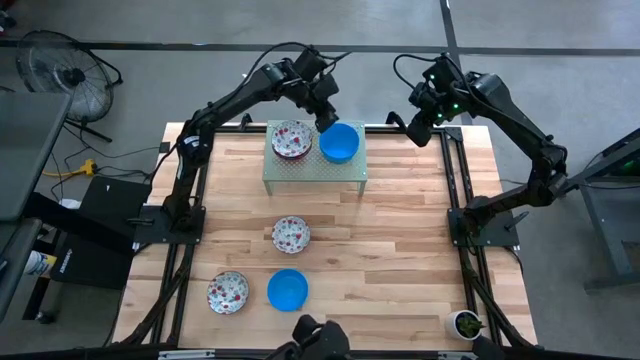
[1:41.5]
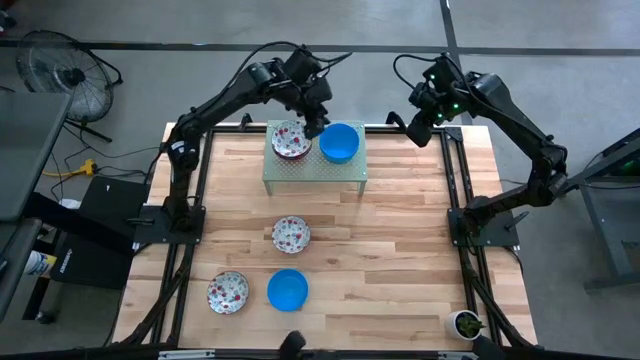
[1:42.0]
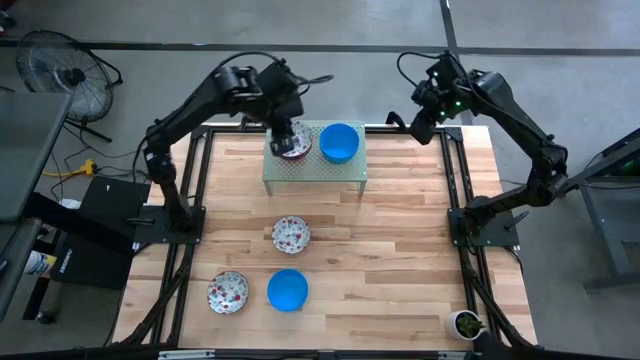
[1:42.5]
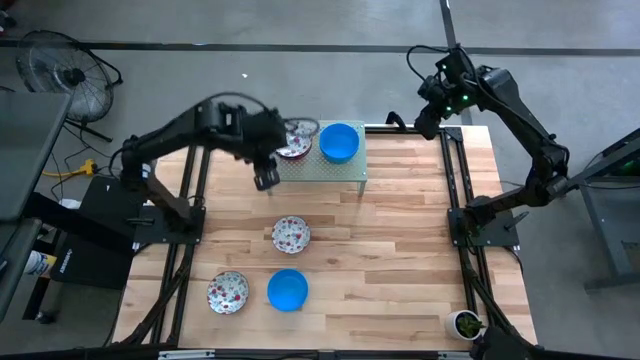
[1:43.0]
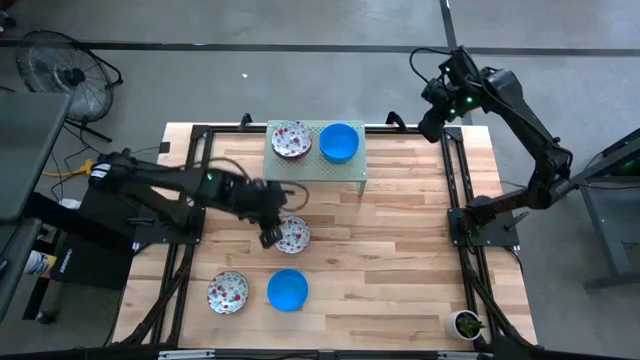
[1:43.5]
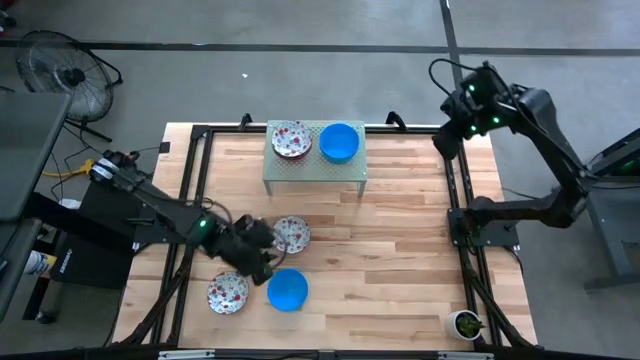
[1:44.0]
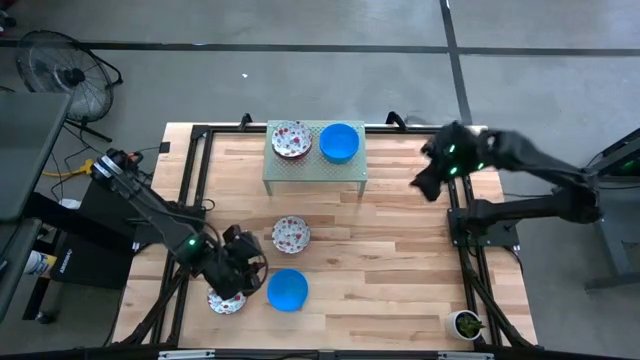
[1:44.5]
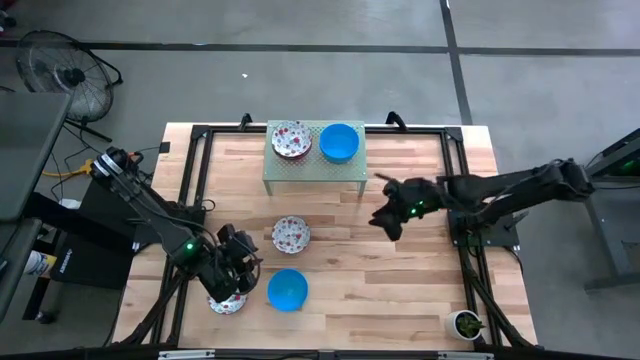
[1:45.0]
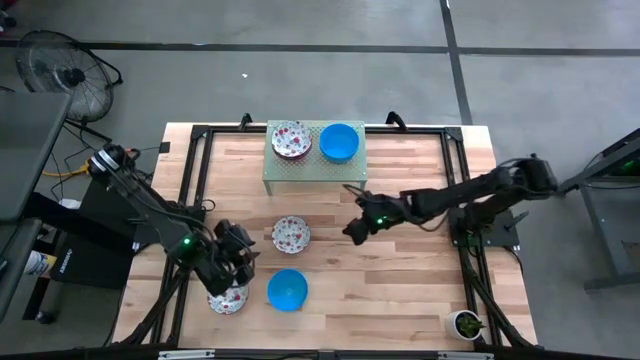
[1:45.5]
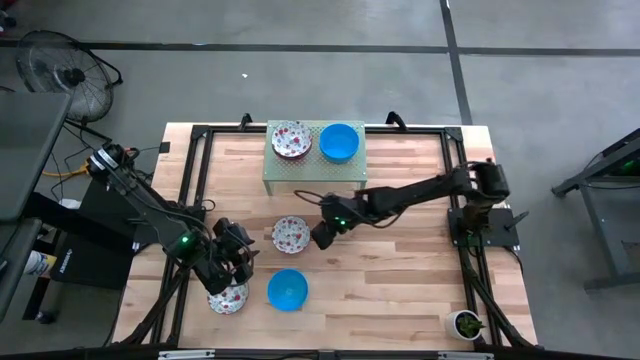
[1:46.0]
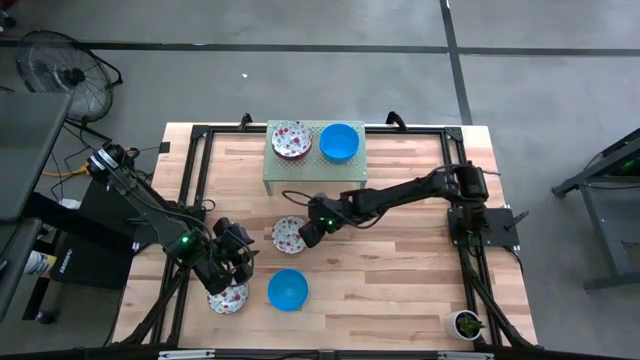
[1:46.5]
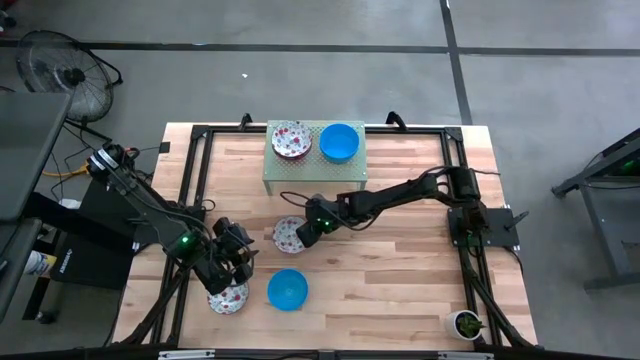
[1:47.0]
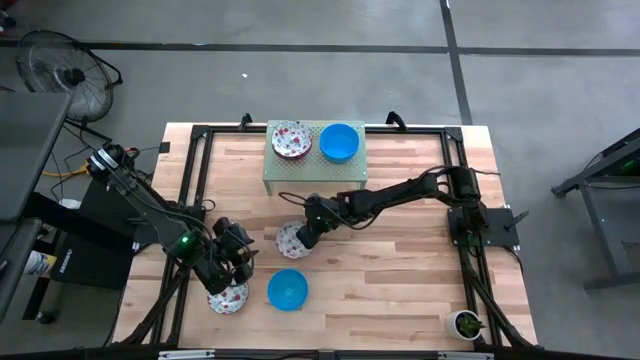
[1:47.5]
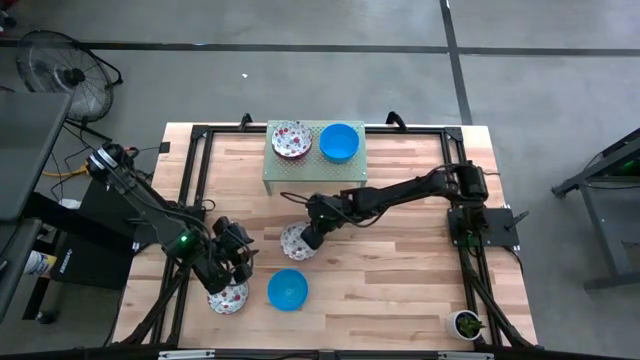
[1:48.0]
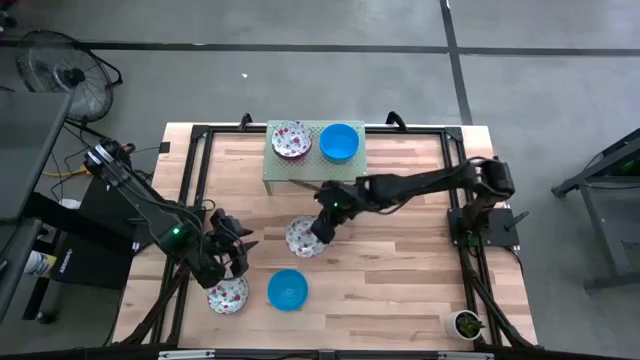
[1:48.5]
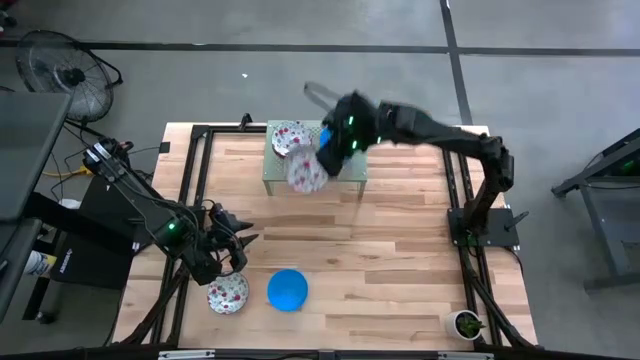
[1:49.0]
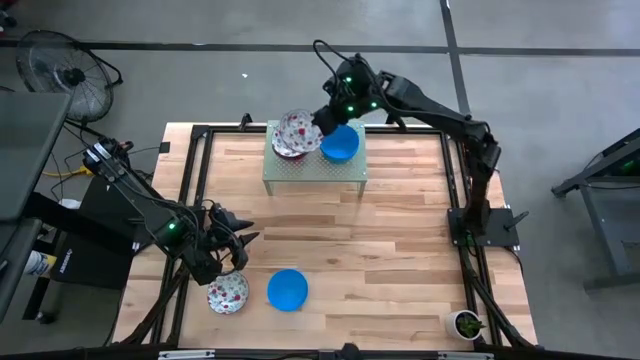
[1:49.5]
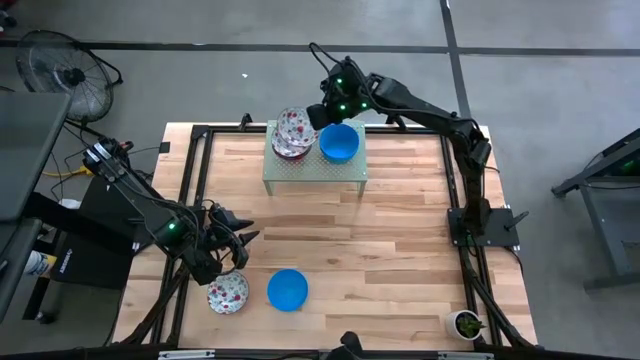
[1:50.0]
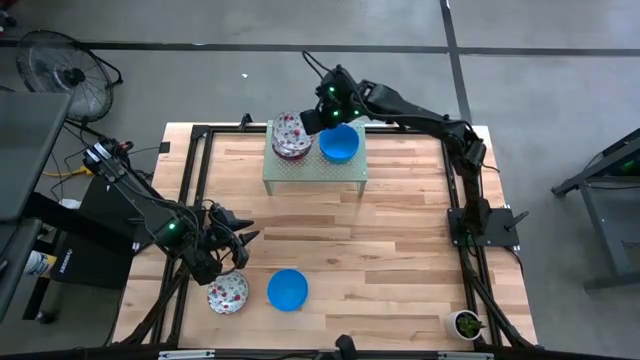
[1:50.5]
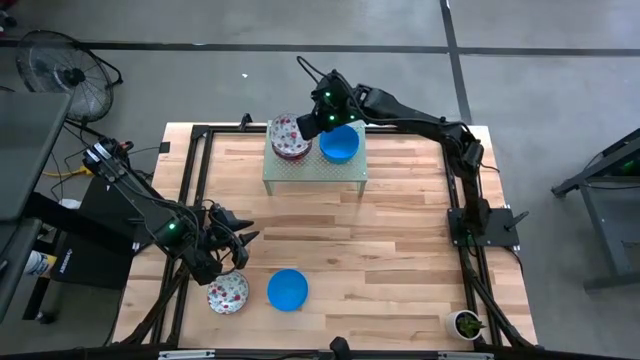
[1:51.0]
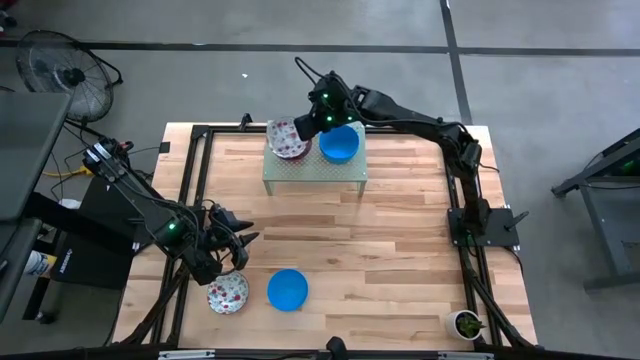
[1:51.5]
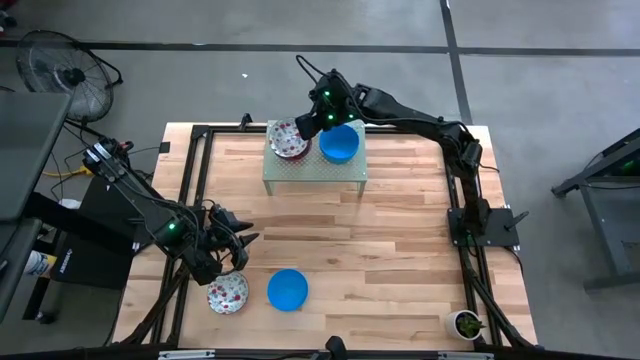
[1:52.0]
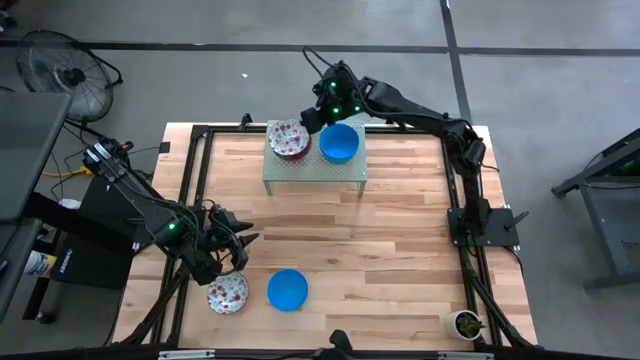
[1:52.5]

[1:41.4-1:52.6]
Task: Pick & Place Mini bowls
Stack the white and red bowl on top of the stacked white and red bowls on the shelf

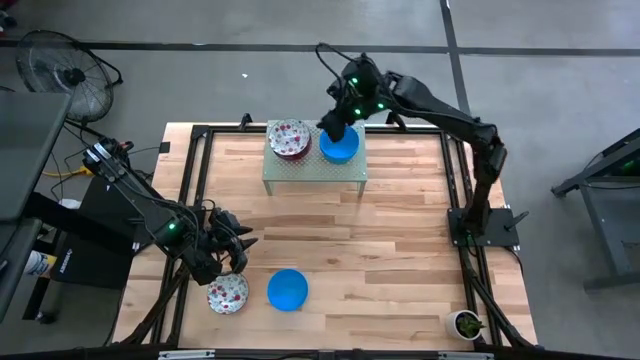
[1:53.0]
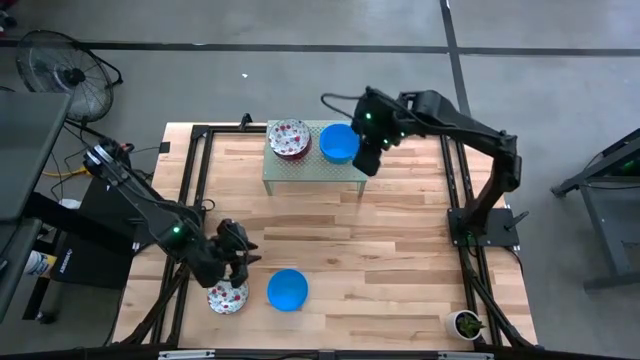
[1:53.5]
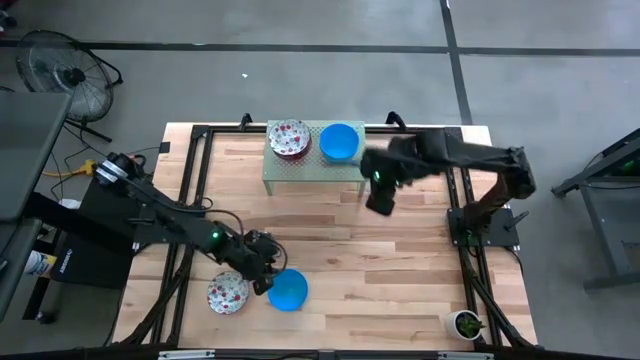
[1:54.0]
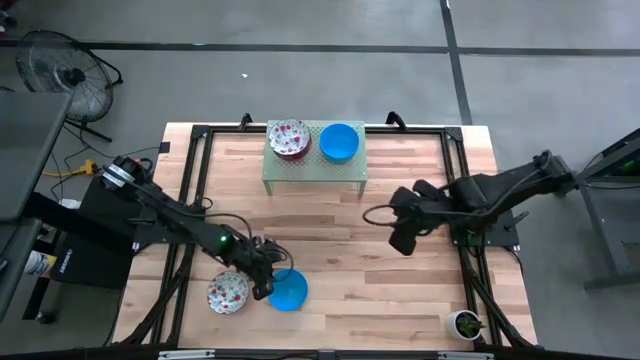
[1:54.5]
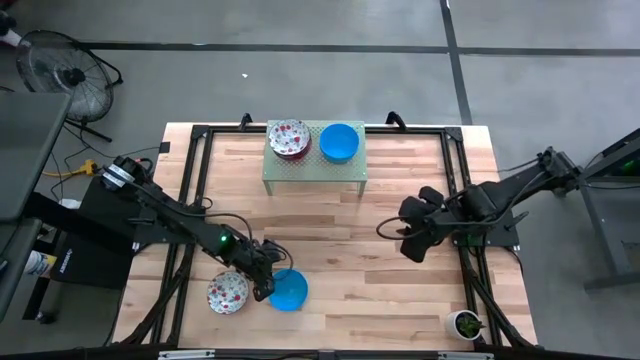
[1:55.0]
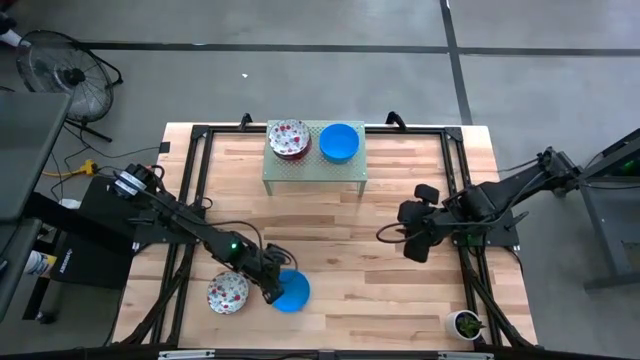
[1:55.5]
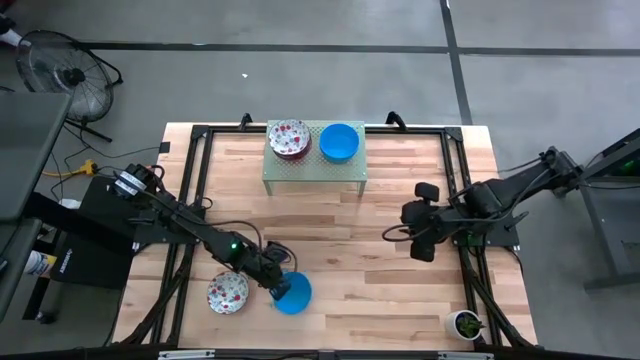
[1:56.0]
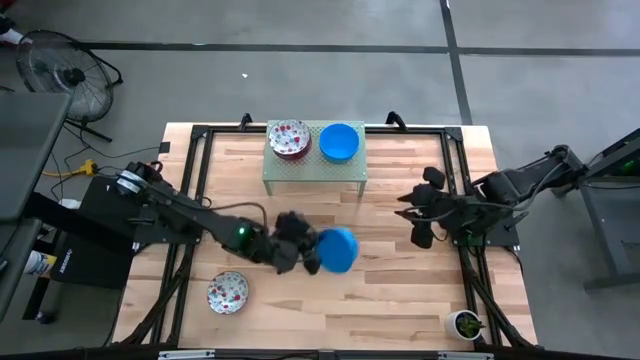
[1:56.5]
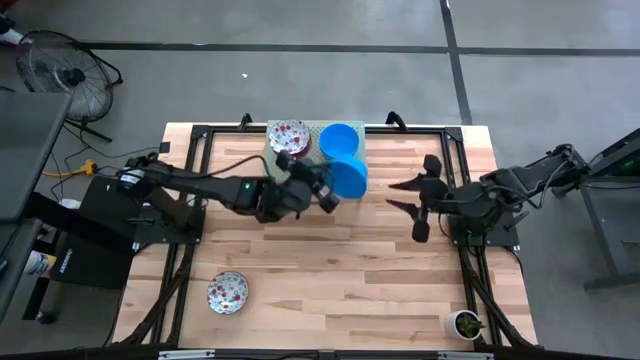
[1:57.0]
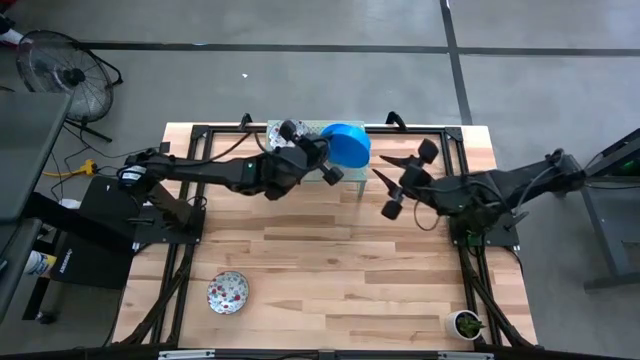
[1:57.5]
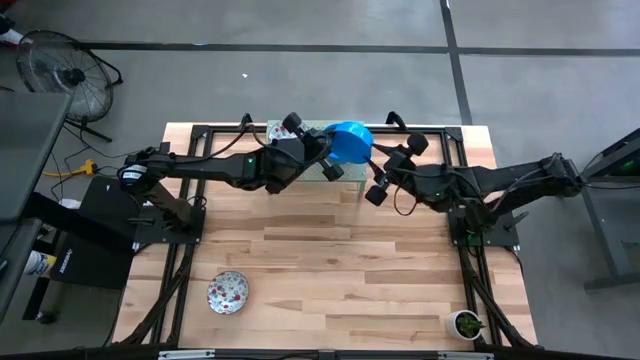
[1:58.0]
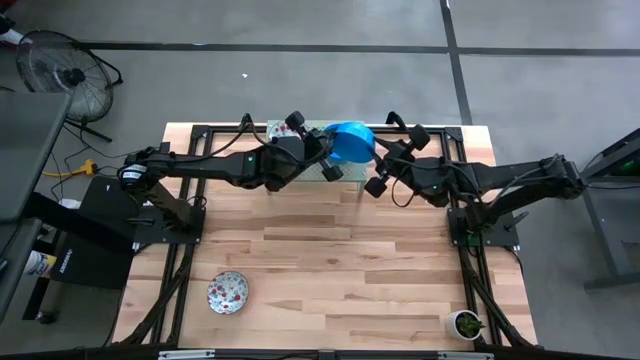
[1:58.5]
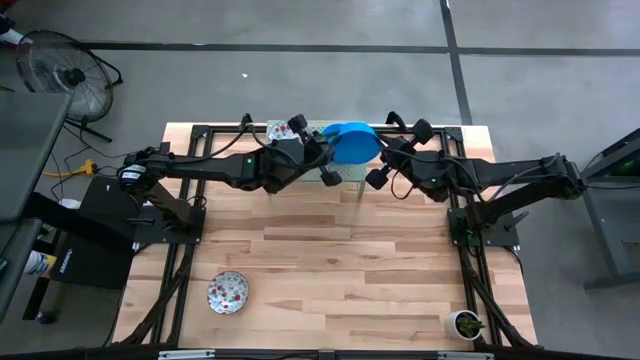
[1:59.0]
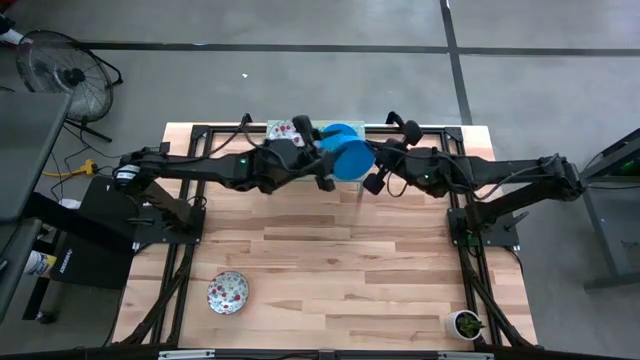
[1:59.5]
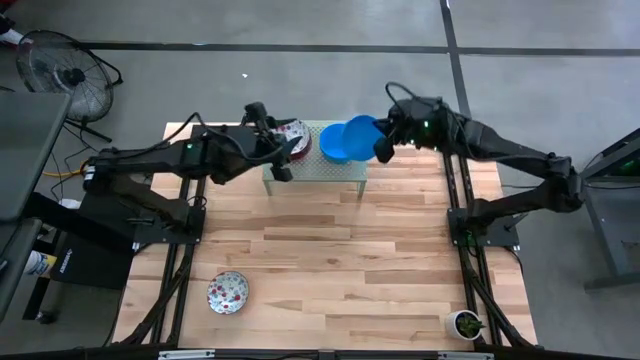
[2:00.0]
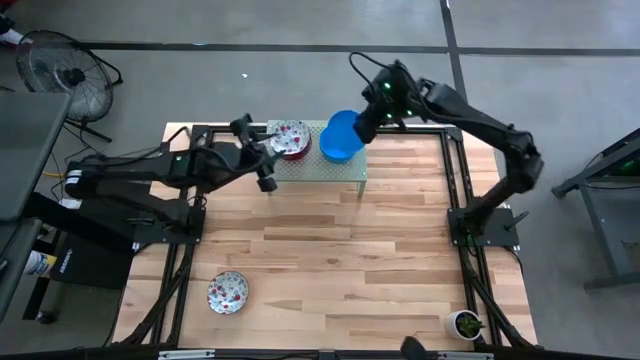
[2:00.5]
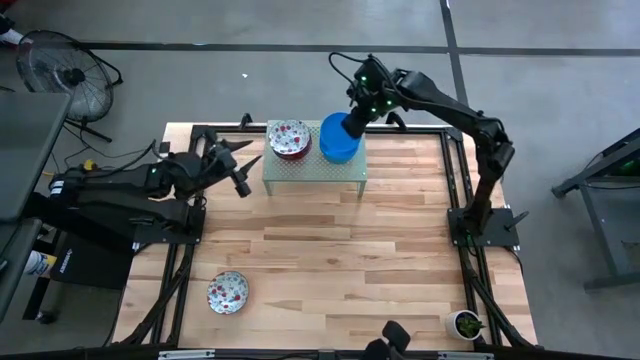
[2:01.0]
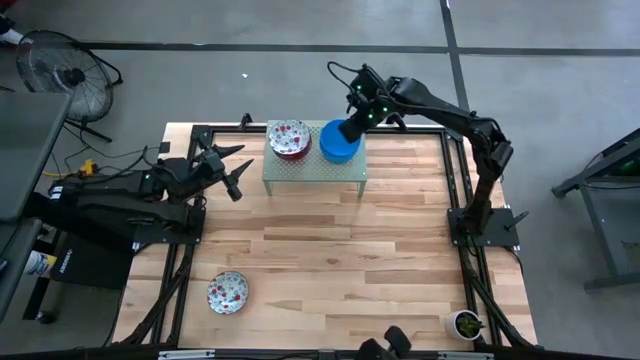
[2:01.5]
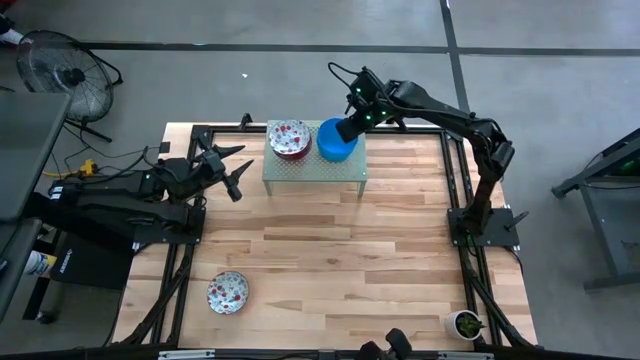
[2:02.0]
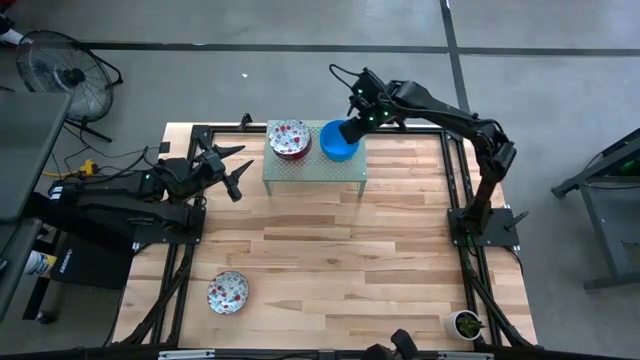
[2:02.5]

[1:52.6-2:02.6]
Stack the blue bowl on top of the stacked blue bowls on the shelf

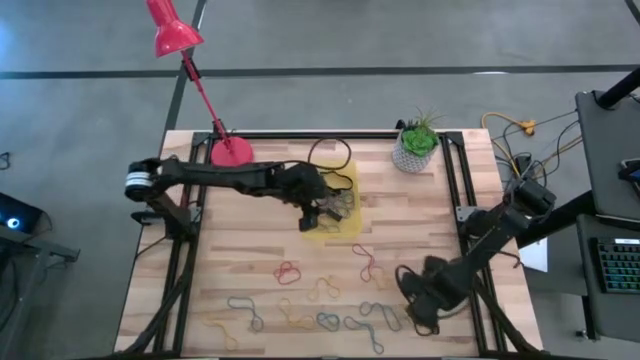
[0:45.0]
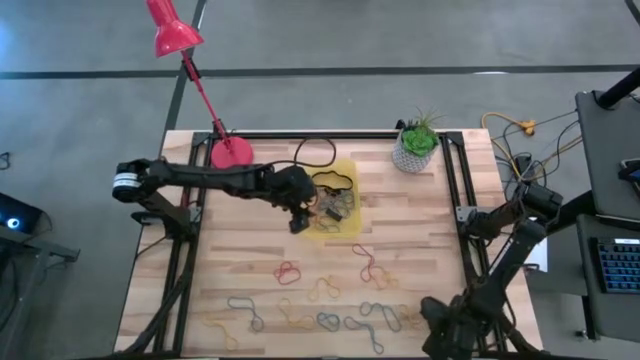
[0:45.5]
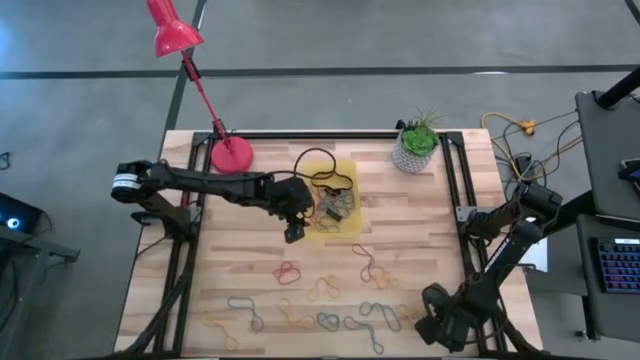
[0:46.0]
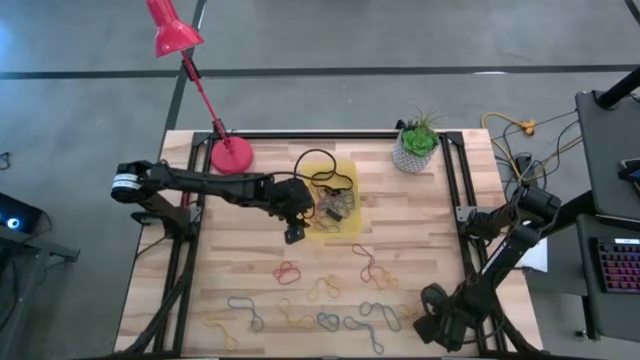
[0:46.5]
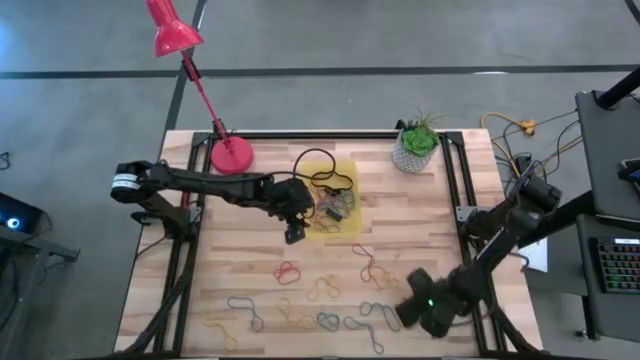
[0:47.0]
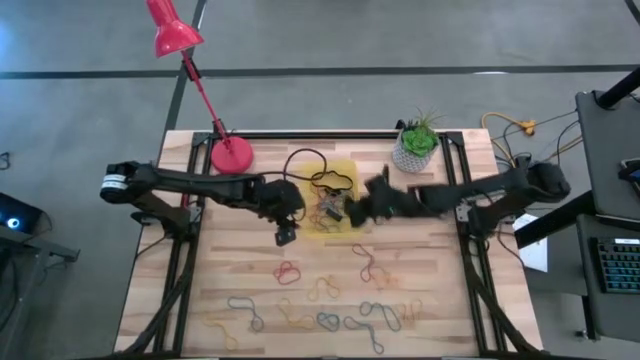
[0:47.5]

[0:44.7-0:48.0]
Task: Pick and place rubber bands into bin
Put the black rubber band into the yellow bin
